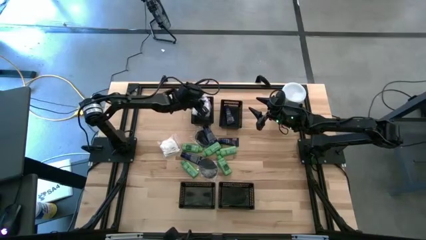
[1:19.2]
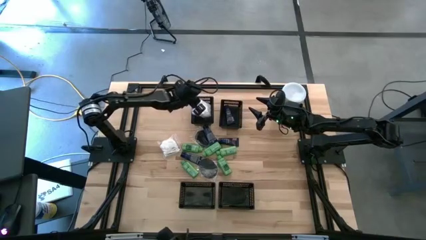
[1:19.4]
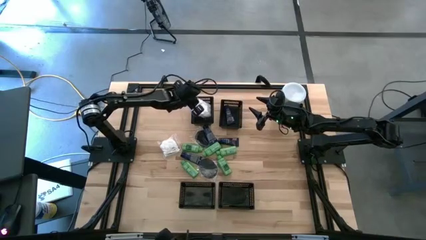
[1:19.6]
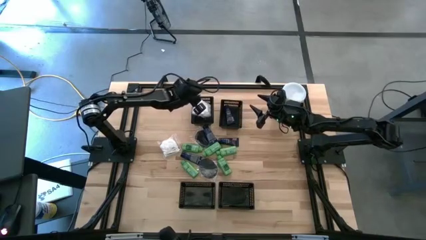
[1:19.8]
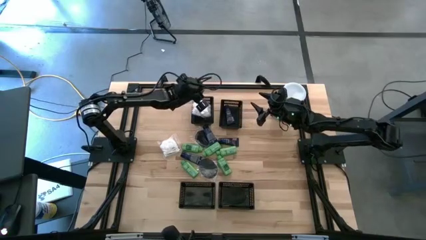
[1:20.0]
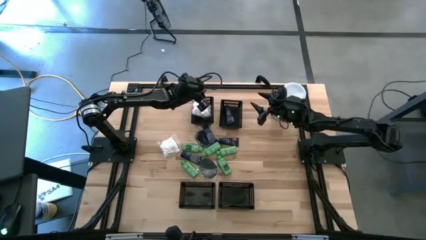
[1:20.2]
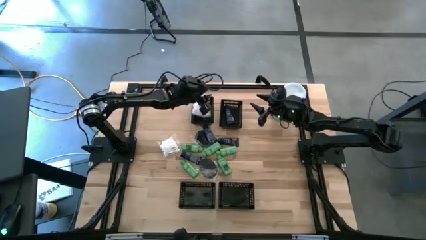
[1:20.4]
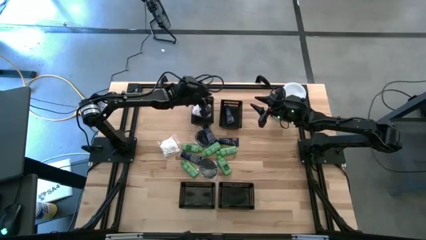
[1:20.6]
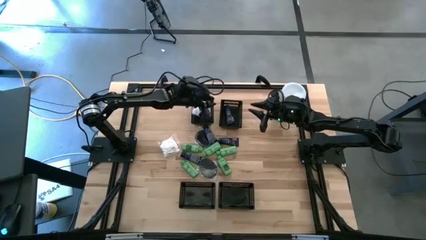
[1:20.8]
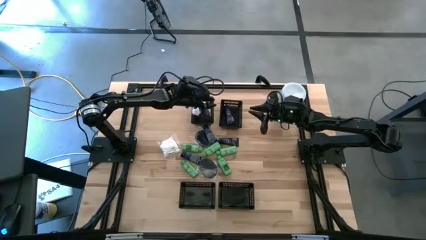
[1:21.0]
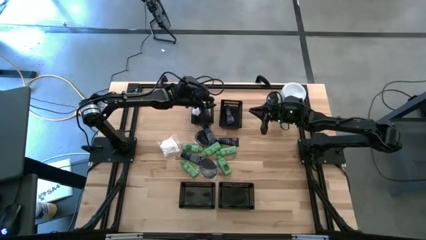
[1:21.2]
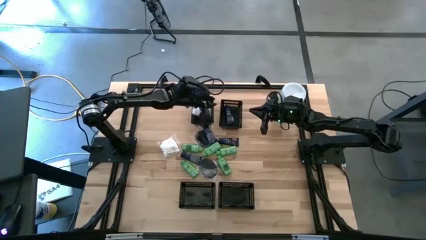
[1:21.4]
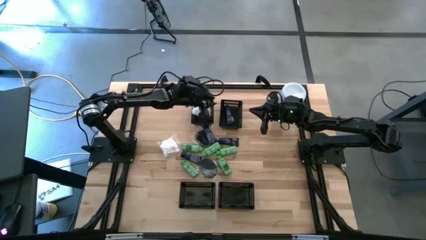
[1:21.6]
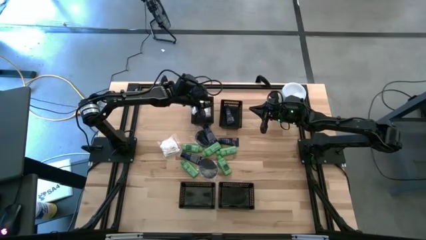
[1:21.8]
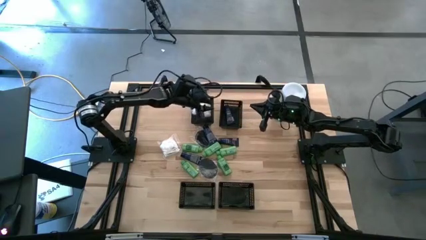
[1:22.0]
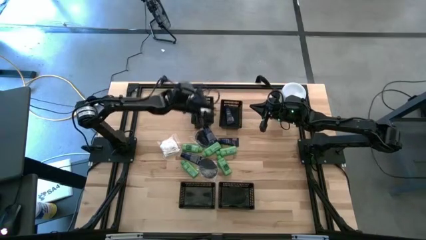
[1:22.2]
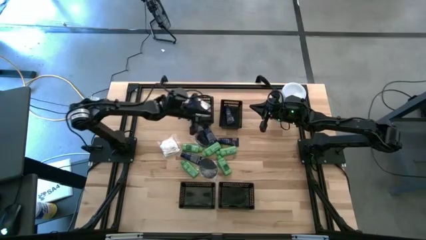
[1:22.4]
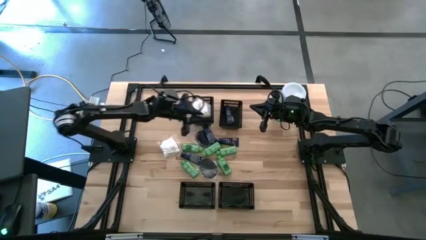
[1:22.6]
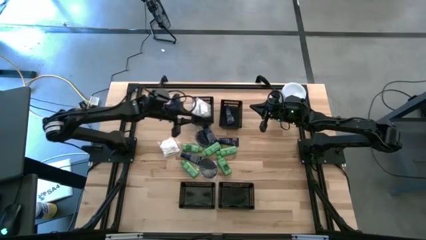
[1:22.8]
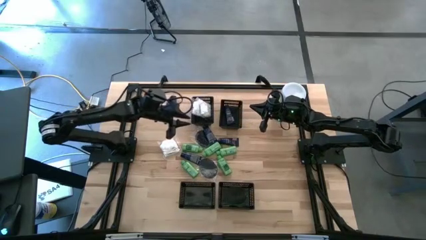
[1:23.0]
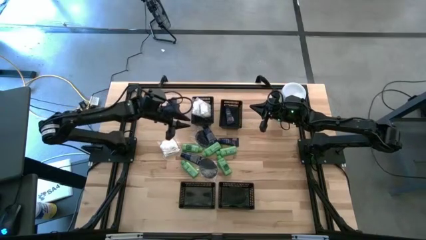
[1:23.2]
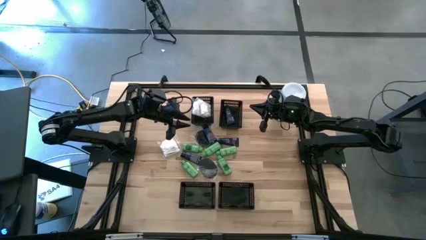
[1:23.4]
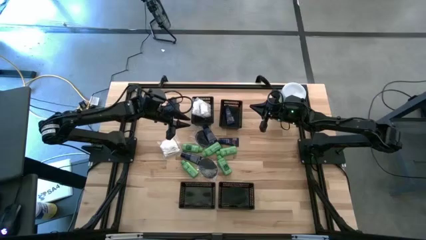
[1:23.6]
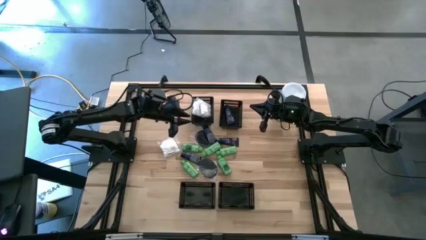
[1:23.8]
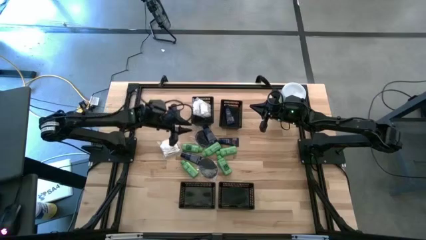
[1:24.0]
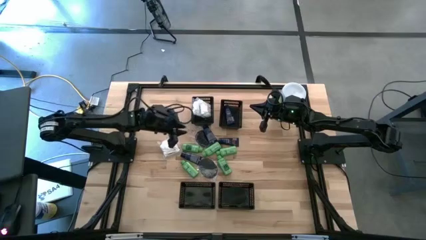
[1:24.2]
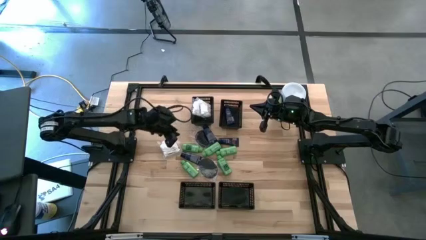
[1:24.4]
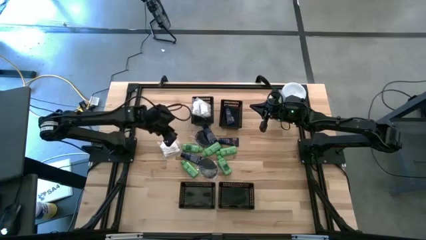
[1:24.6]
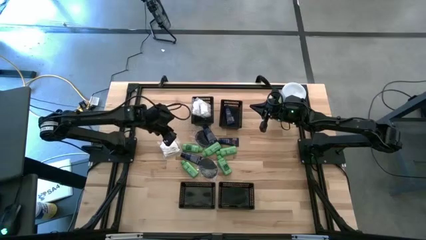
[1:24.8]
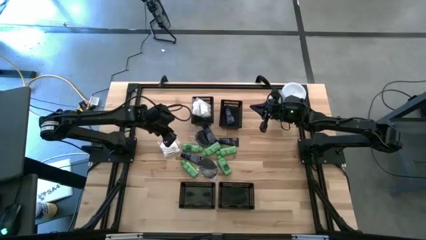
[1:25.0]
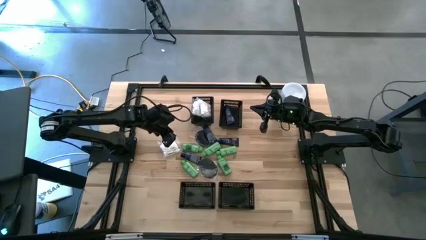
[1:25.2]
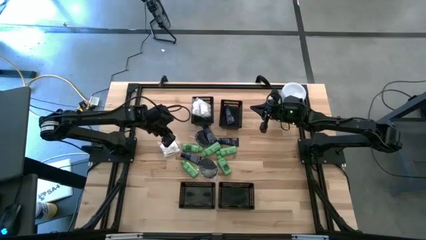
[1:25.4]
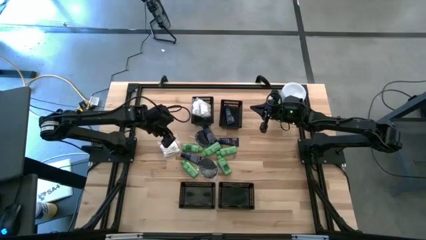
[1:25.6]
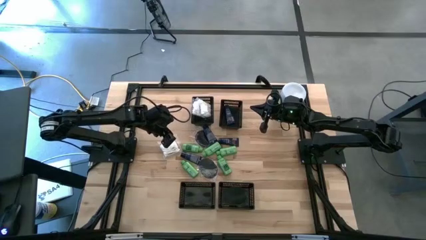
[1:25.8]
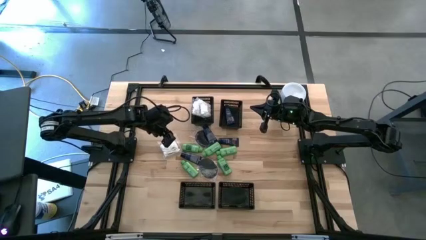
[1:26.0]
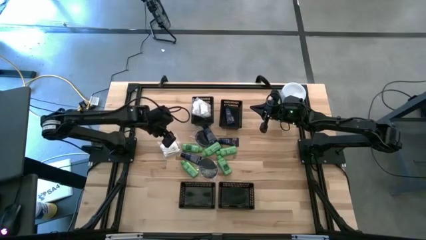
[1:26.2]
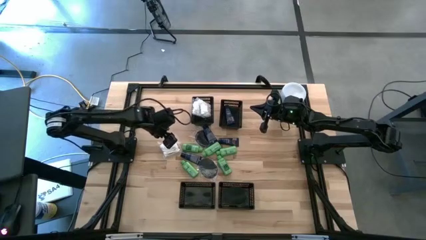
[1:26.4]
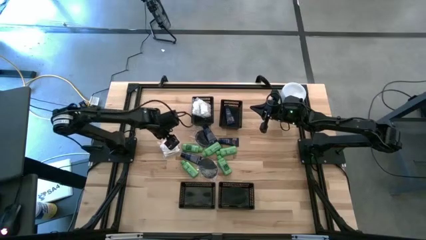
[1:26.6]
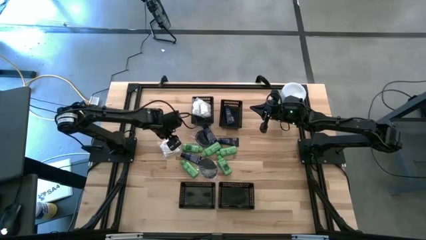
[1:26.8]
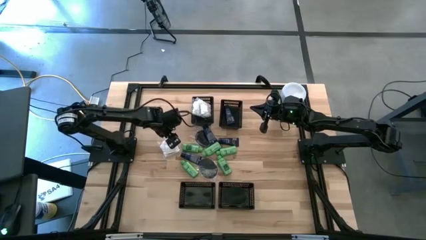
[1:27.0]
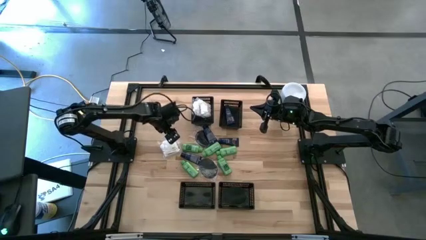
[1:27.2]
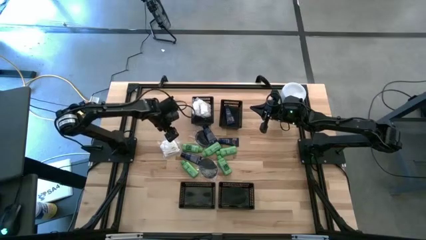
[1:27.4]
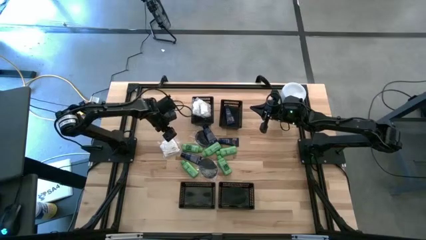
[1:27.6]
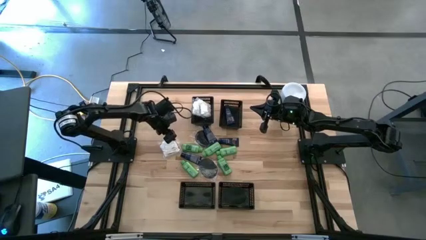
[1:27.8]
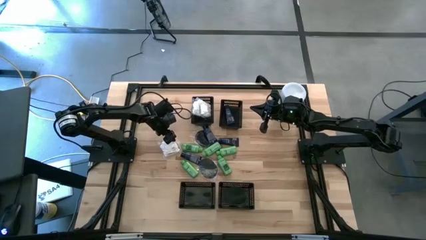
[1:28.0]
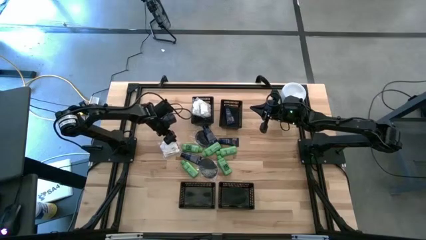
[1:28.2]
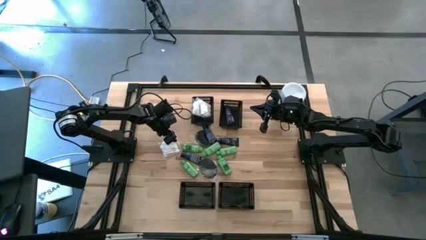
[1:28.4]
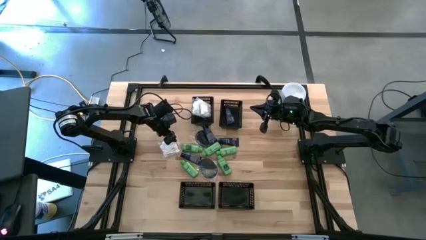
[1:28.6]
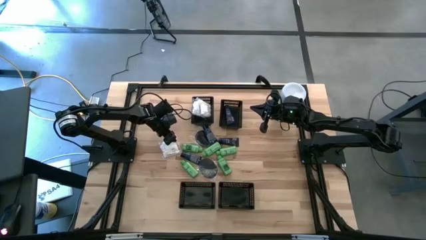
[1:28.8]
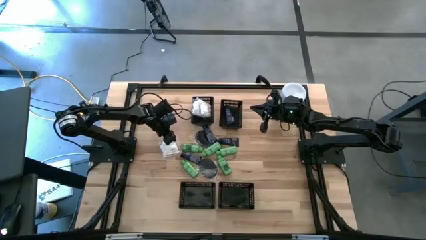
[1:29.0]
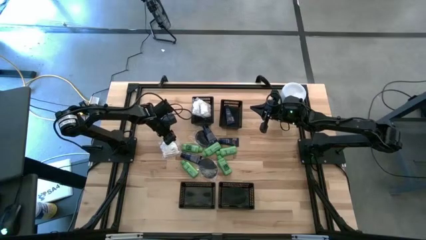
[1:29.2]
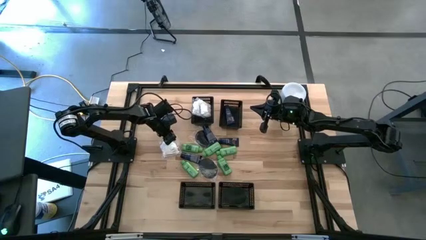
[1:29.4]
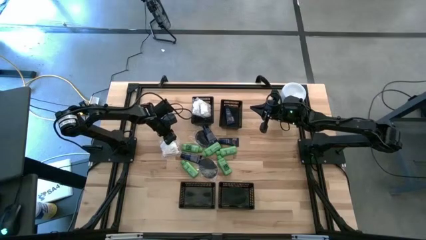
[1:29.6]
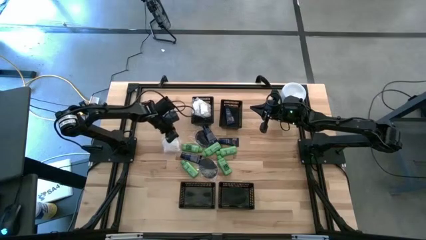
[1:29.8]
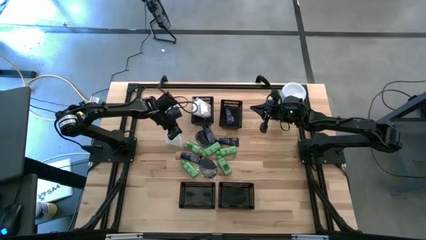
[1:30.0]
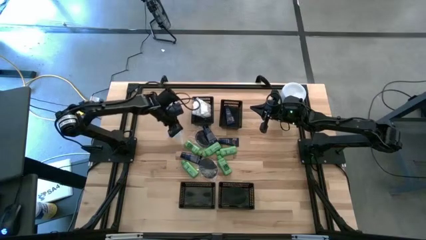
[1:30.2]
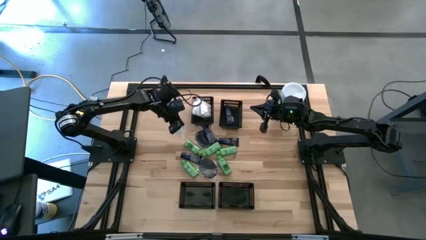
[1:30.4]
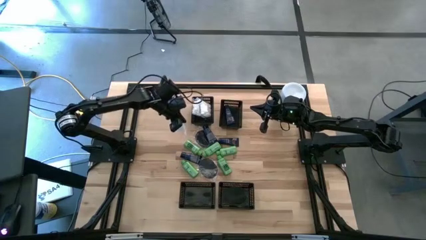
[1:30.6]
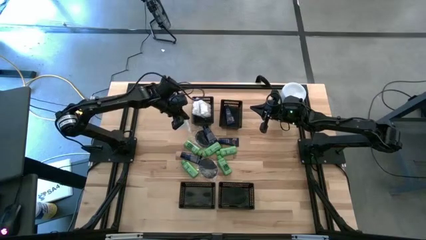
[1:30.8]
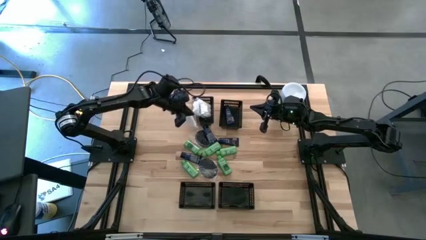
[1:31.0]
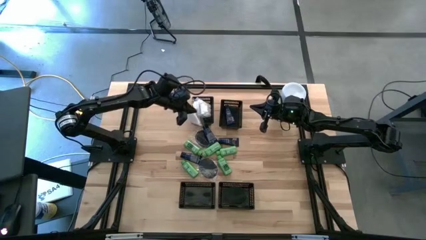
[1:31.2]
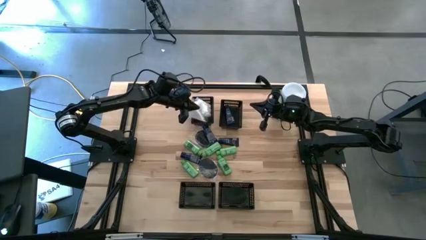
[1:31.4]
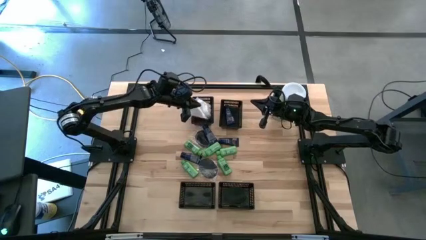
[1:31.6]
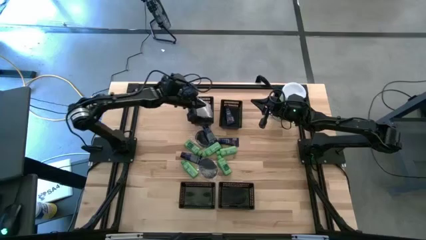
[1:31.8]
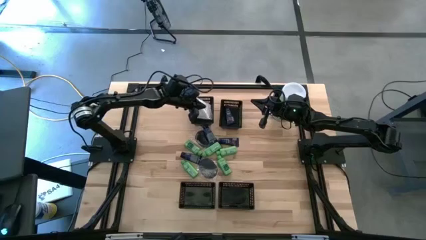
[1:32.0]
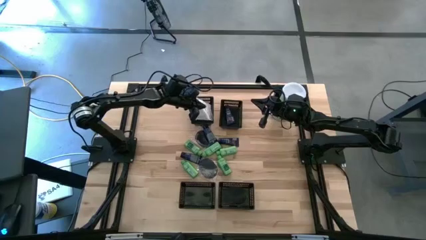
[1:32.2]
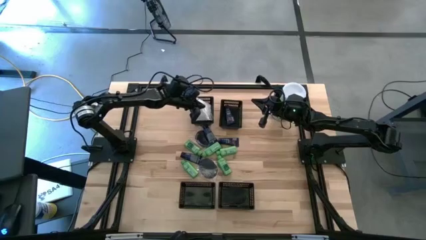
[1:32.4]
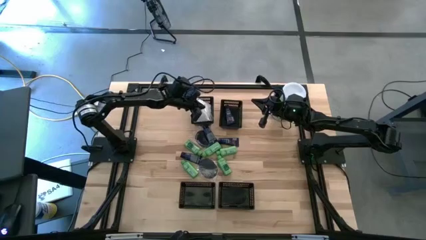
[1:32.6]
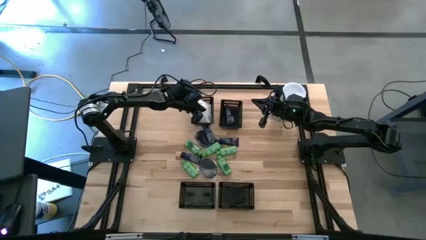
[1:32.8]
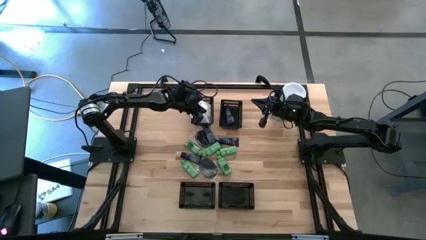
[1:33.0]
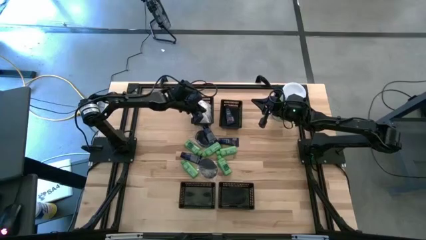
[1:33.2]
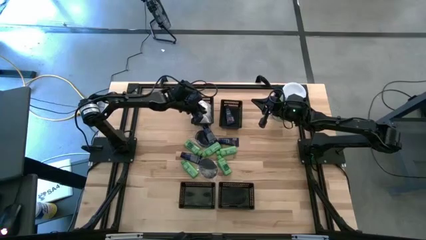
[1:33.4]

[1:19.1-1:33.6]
Task: Pick & Place Travel size toiletries
Put the cotton pack into the top left black bin

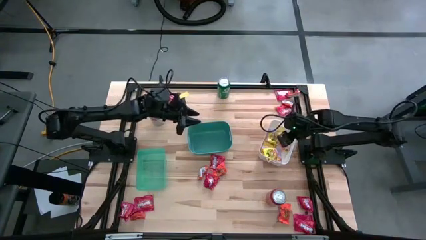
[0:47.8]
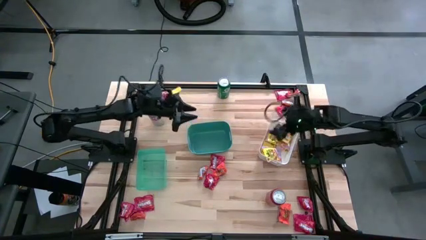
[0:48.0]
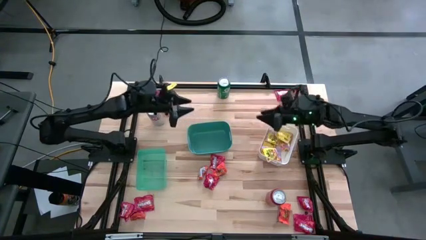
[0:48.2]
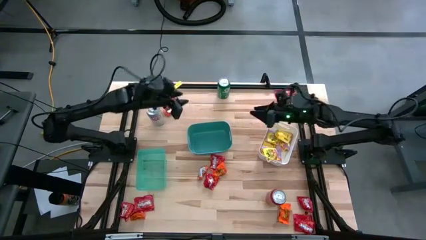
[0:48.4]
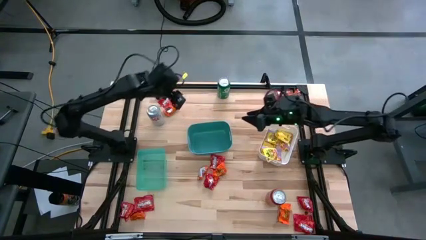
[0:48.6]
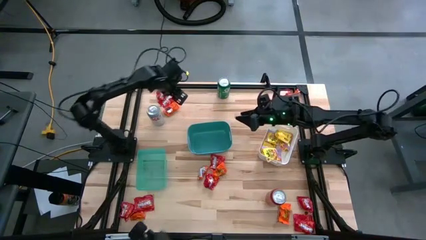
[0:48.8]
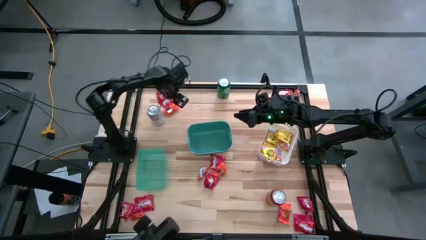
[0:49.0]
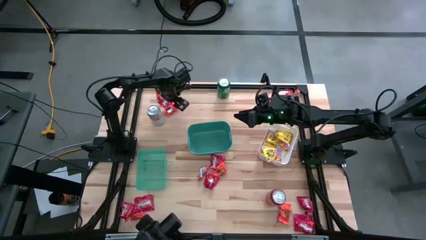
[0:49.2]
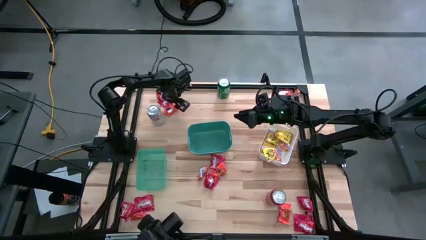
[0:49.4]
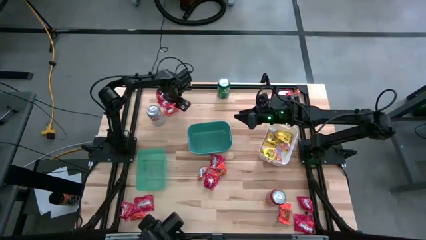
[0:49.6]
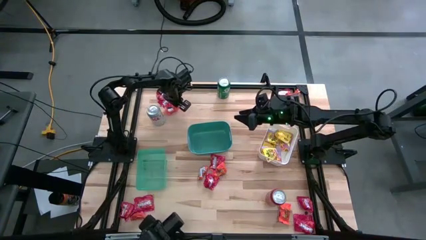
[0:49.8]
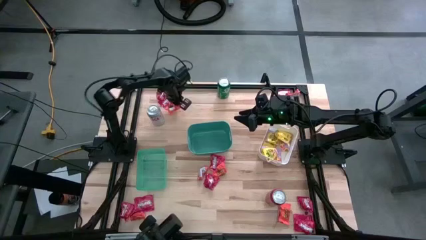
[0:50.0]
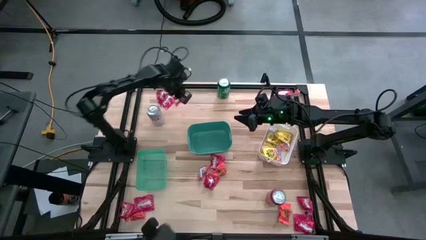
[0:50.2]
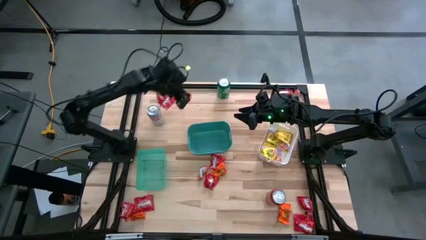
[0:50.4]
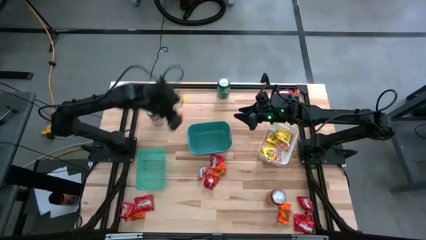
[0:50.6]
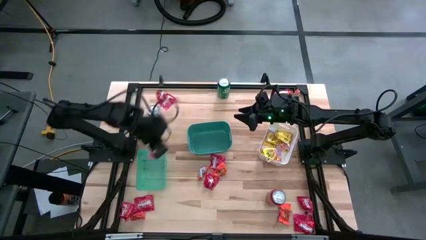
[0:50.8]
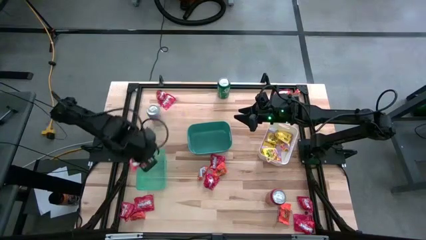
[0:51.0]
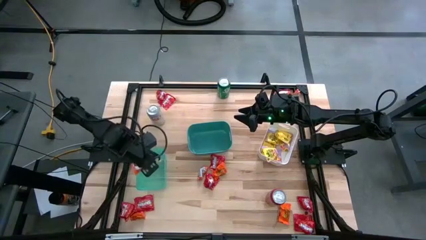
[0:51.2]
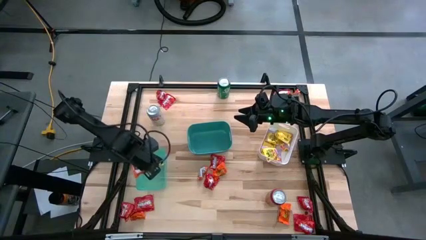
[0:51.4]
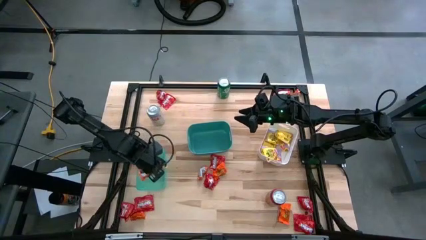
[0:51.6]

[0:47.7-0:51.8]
Task: Sort candy
Put the orange chocolate into the light green bin
